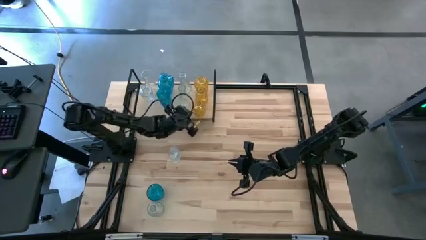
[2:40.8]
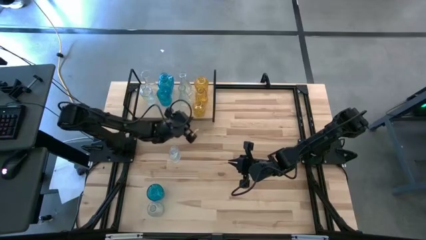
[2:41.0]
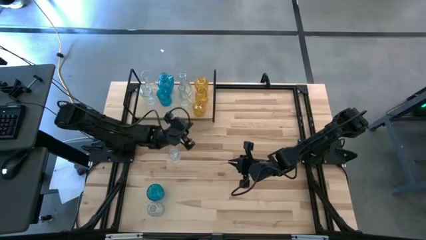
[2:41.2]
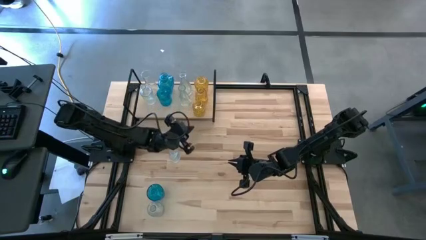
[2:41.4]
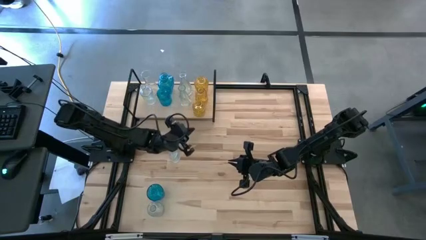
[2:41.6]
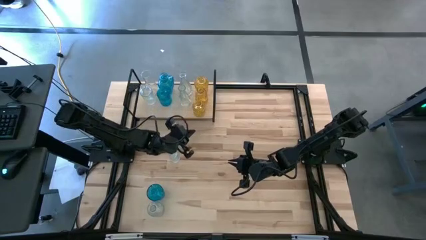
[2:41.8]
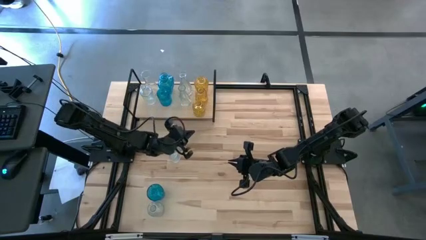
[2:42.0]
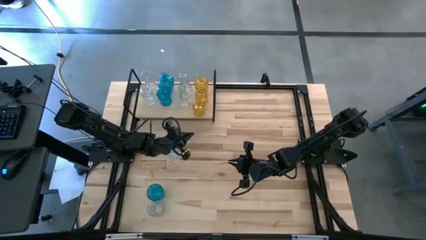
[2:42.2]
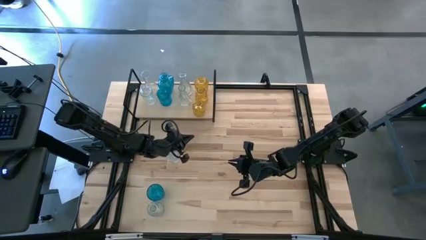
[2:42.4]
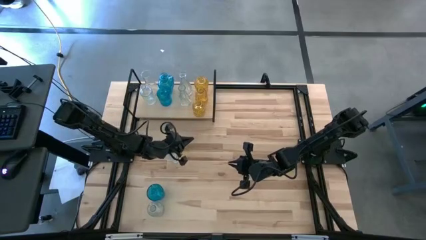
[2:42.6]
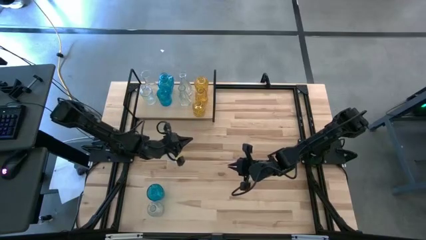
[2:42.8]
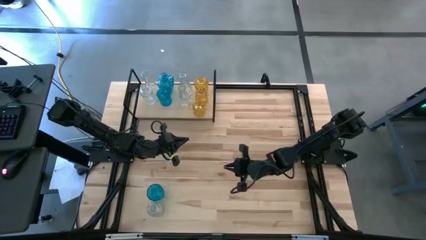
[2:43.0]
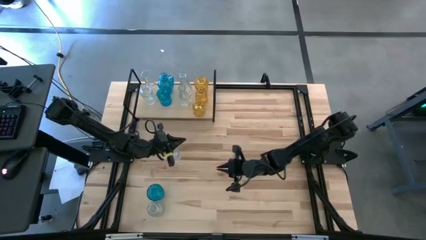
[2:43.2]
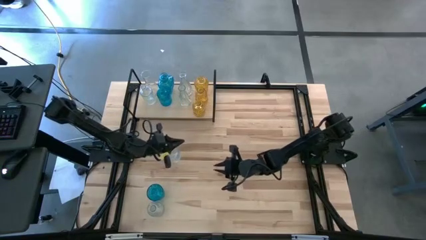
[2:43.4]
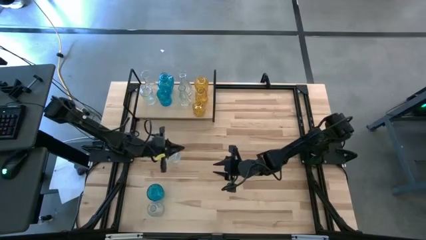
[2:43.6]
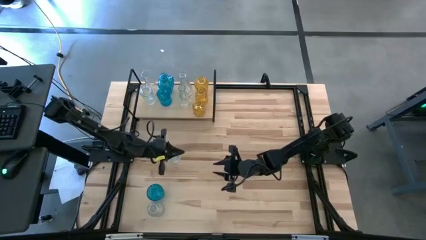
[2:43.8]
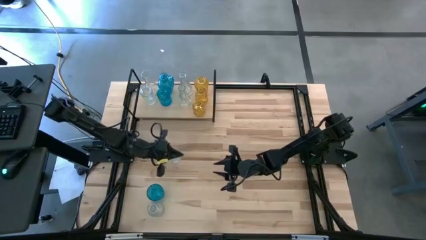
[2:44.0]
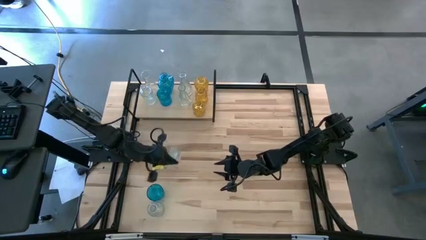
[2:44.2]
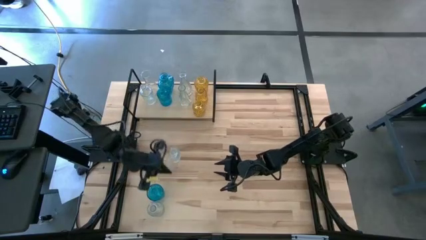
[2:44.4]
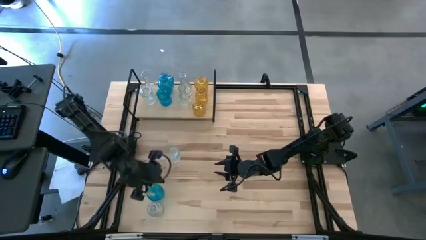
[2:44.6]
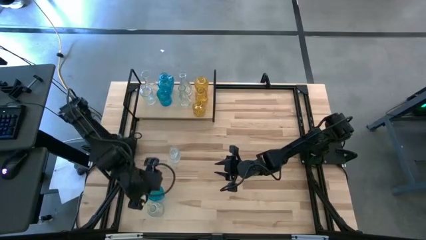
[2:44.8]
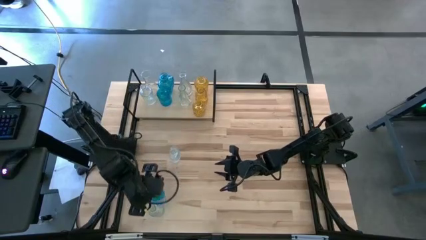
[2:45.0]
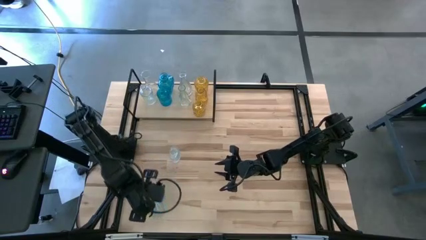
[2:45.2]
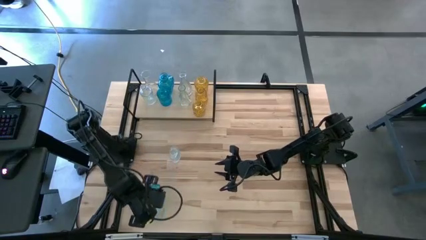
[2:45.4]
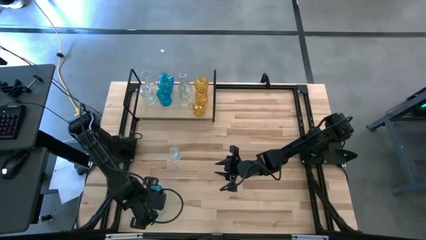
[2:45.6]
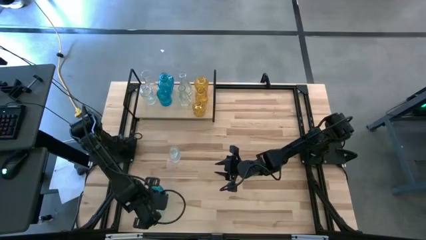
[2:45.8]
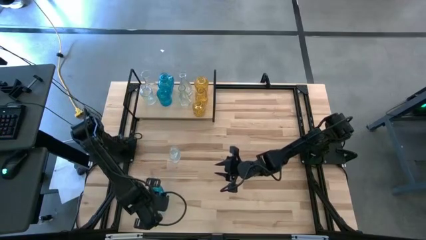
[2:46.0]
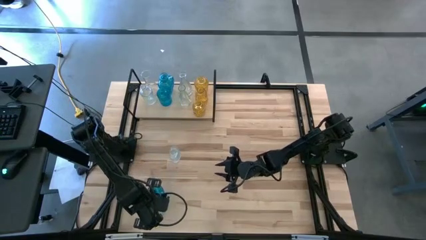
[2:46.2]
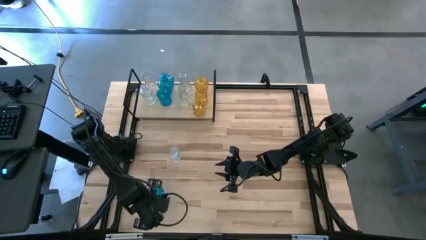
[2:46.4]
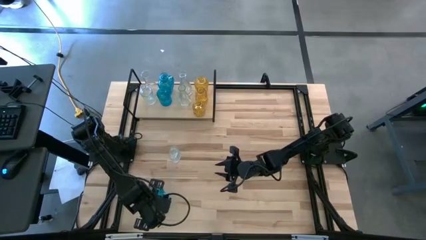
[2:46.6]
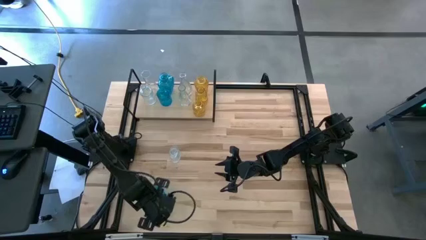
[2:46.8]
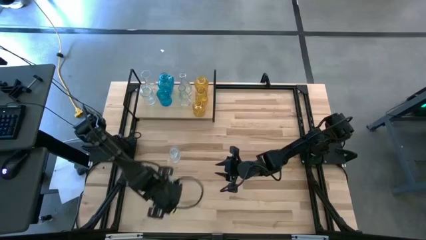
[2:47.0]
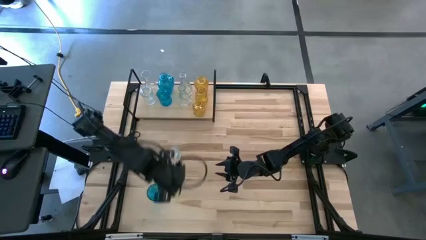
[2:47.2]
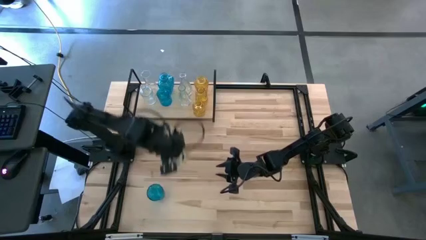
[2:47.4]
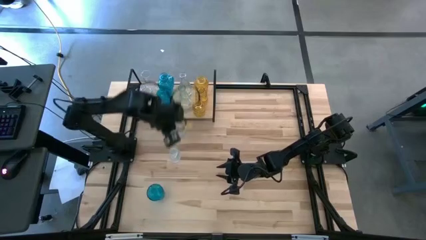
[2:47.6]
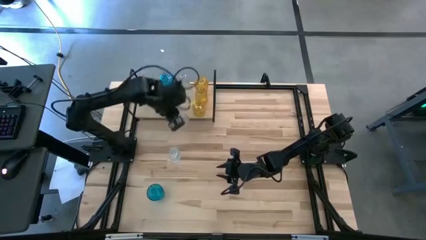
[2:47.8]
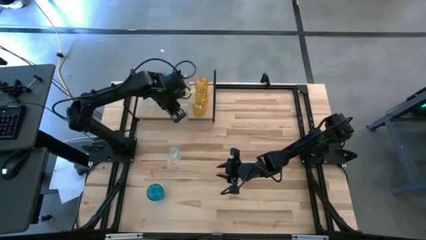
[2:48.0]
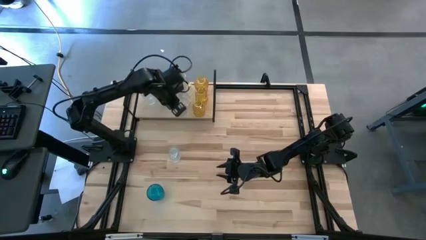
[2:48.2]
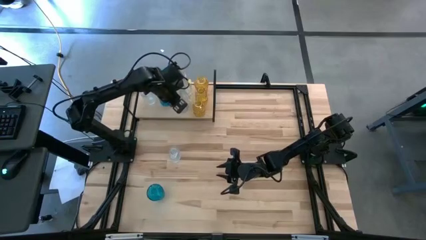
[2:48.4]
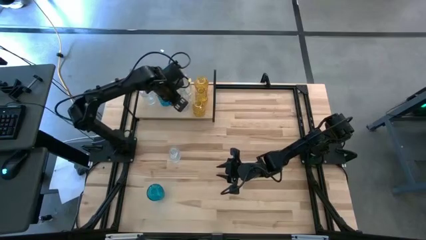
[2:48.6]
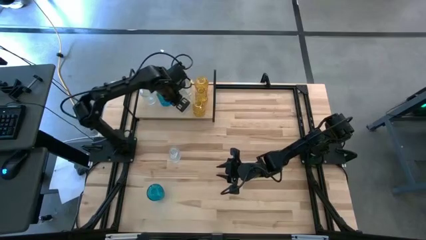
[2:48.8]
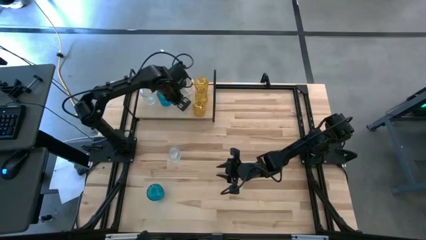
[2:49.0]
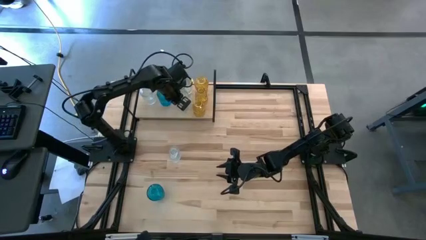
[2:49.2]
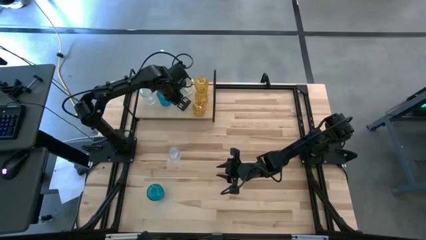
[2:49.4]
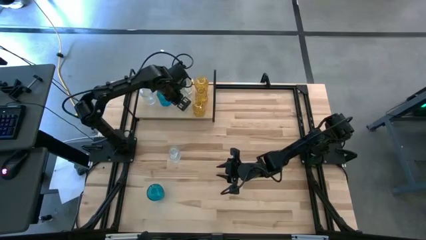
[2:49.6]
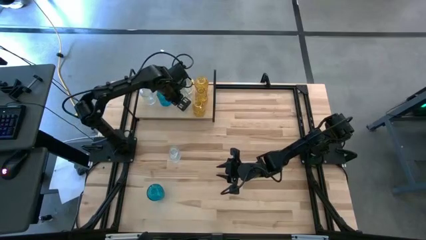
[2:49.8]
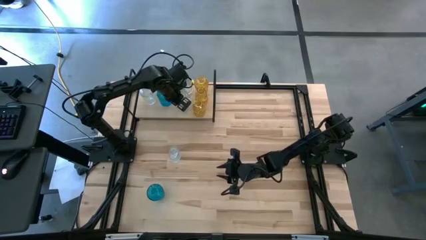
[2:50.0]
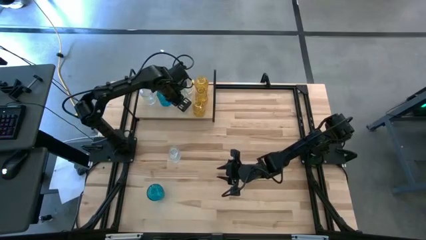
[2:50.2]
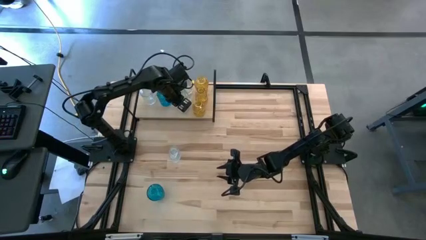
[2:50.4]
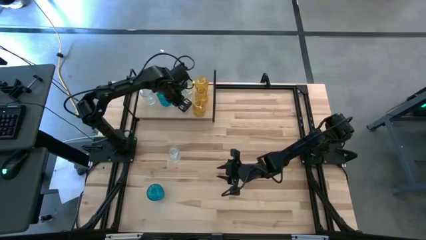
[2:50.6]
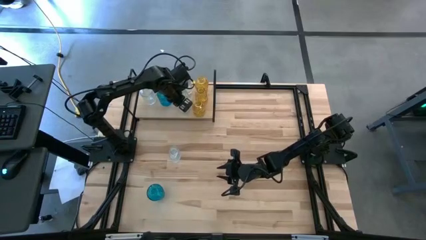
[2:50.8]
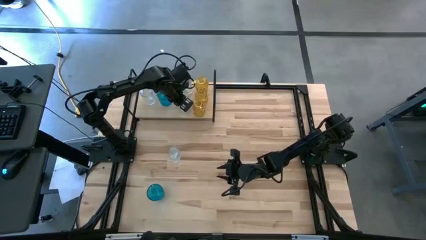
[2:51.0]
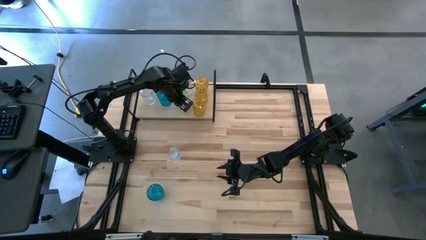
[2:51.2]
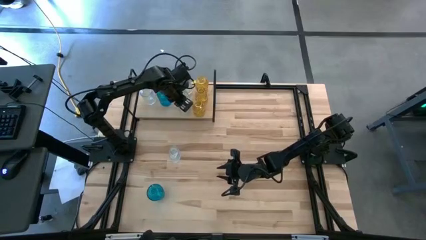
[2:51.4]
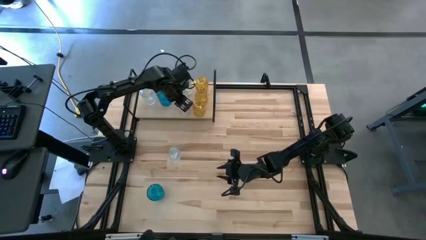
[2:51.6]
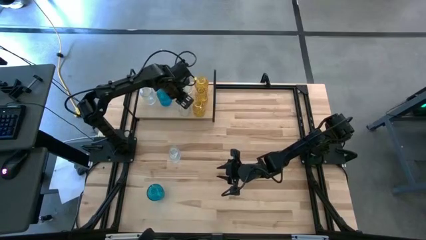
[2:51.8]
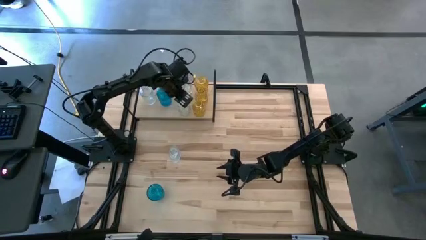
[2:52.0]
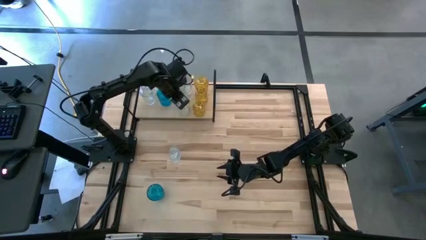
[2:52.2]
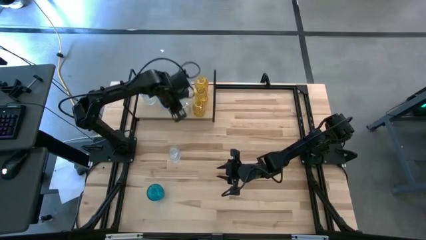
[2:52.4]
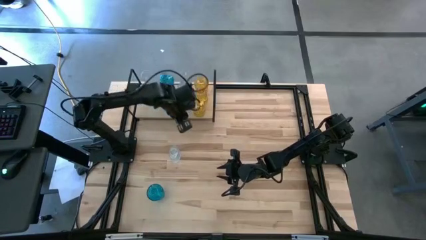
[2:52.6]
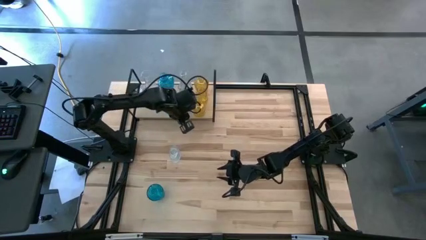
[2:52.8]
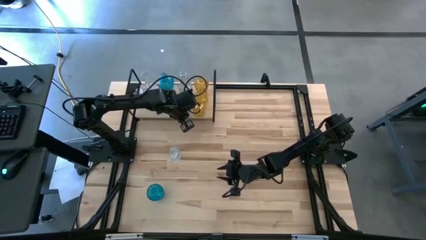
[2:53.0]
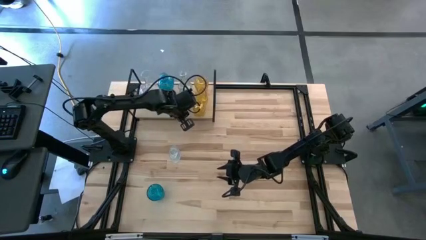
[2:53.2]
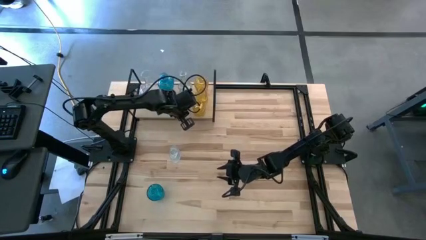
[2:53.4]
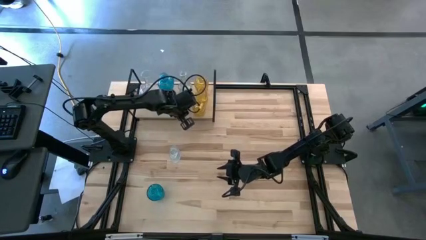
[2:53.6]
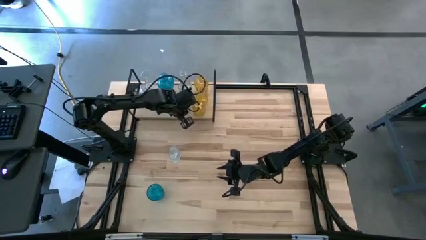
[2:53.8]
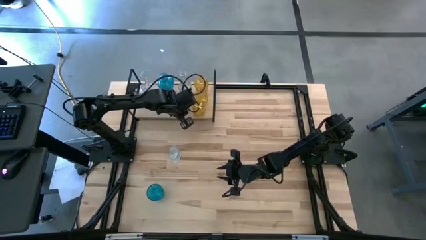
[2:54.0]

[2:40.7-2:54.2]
Task: sort vases onto shelf
Put the transparent vase on the shelf aligned with the other transparent vase

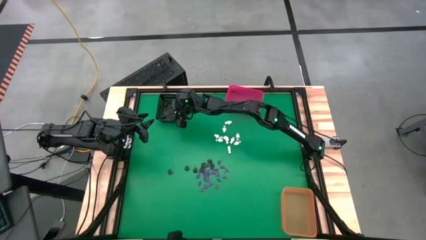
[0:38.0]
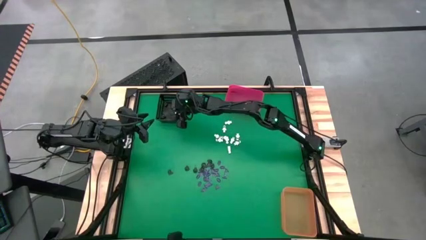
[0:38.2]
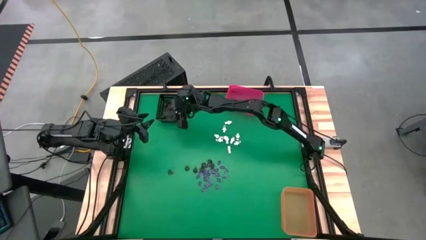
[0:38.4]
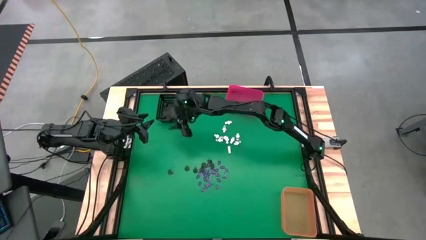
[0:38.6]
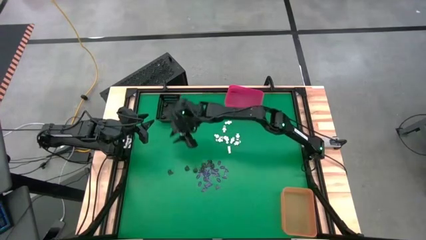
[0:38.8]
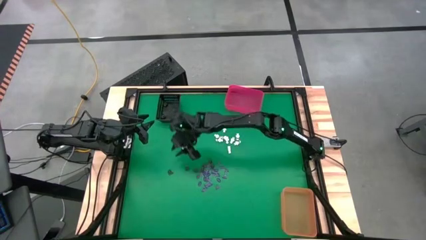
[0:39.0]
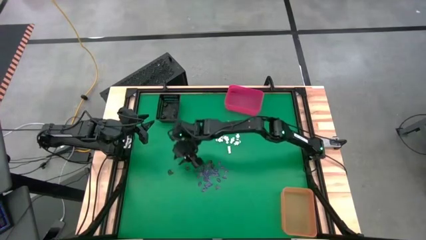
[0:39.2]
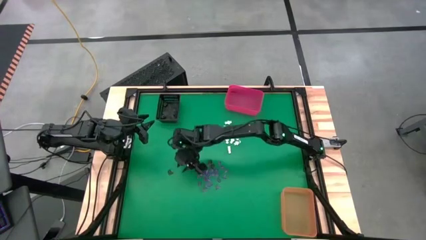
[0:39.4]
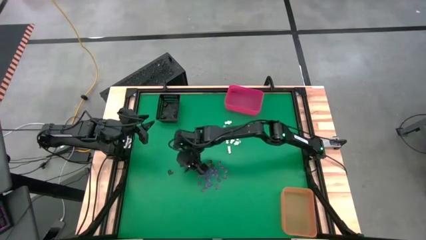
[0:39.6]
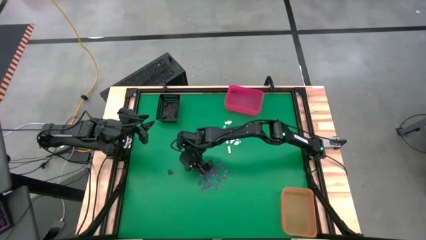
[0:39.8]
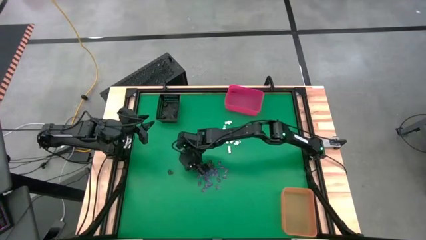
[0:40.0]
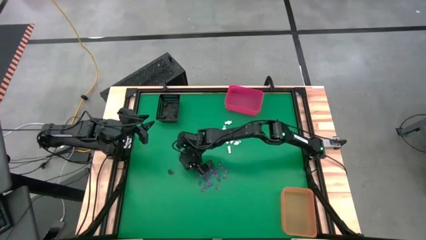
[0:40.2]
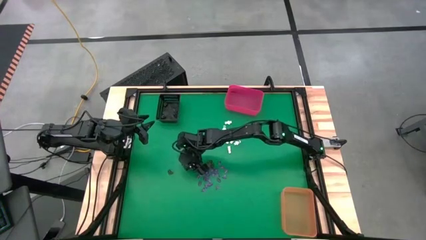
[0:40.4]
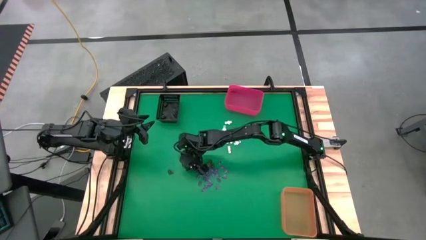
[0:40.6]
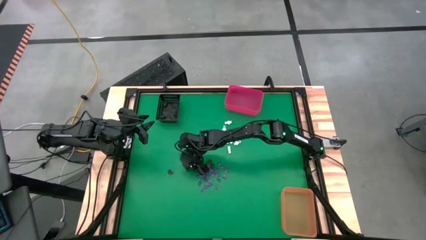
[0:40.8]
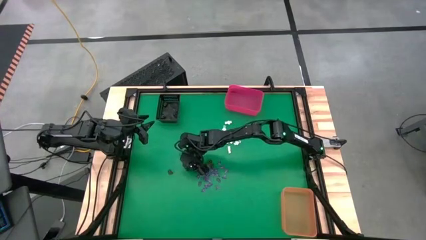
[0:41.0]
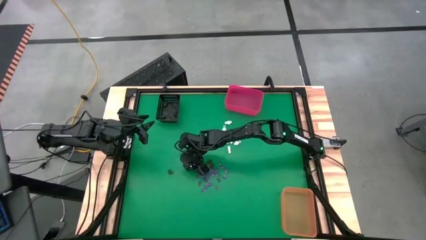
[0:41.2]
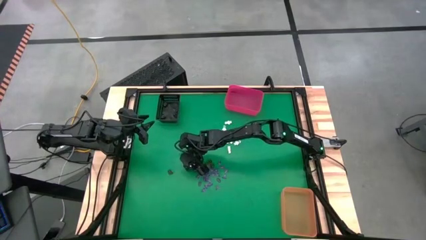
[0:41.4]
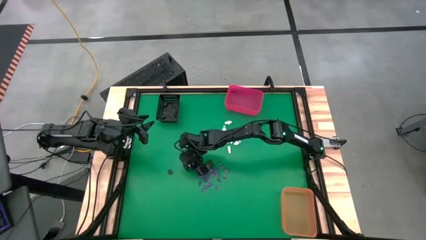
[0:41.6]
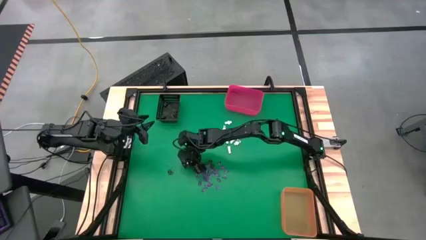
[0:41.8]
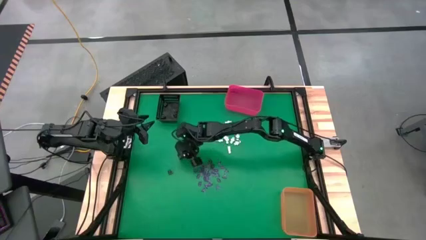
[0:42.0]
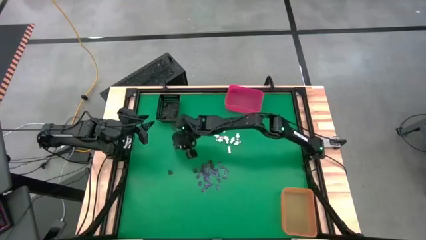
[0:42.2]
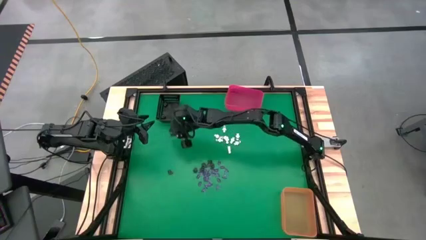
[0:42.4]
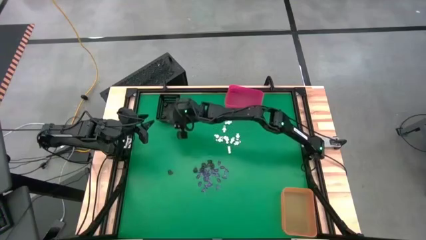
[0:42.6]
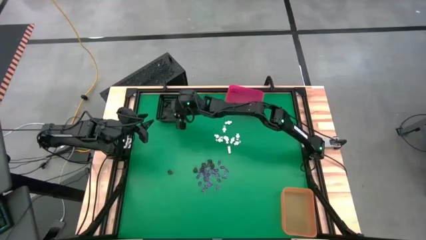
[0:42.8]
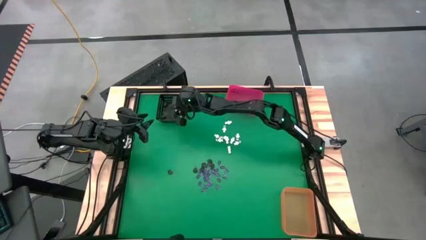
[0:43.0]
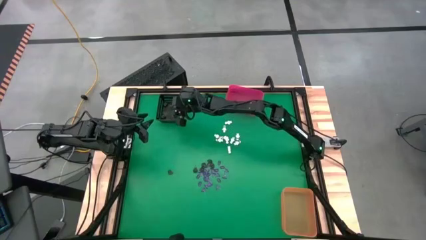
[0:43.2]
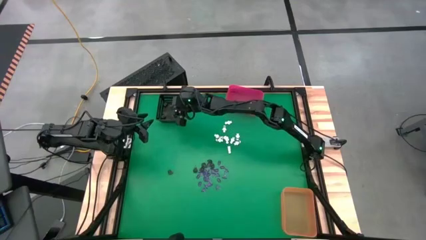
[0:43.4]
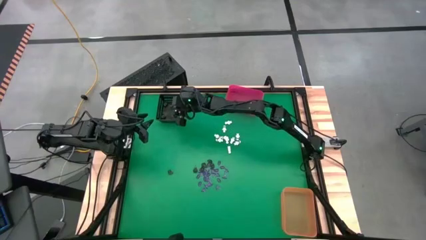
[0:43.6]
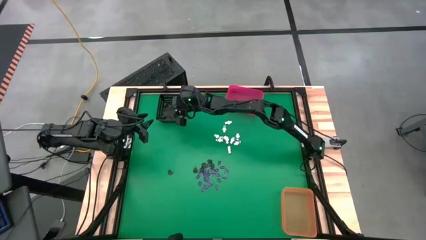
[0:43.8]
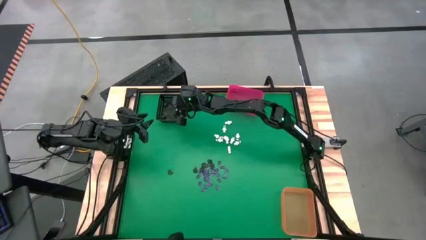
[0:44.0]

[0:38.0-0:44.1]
Task: Sort Halloween decoration
Put the brown skull toy into the black bin
